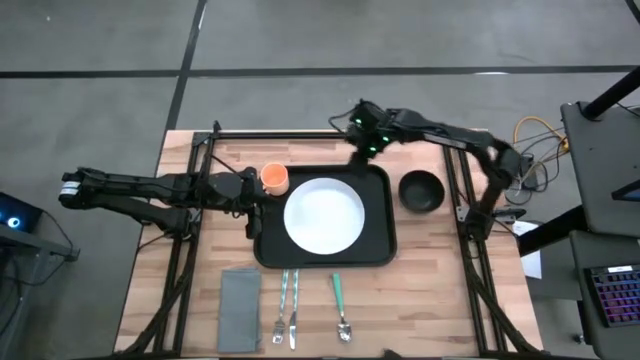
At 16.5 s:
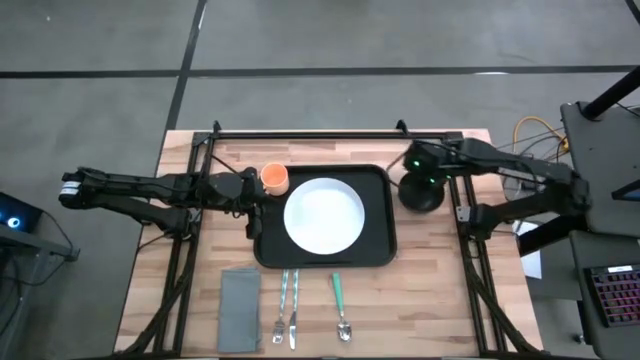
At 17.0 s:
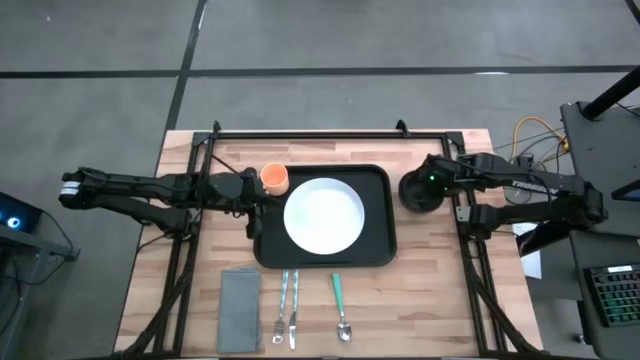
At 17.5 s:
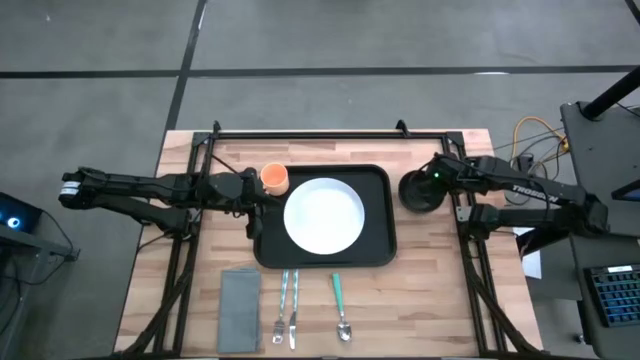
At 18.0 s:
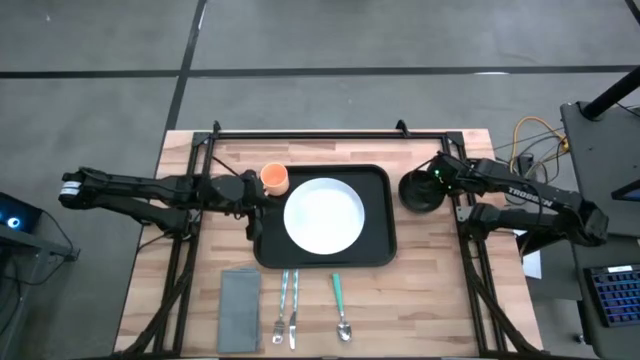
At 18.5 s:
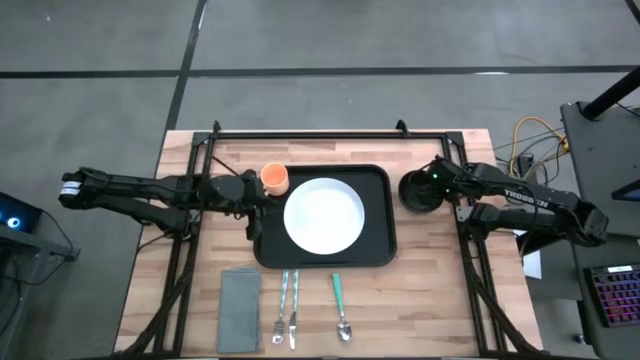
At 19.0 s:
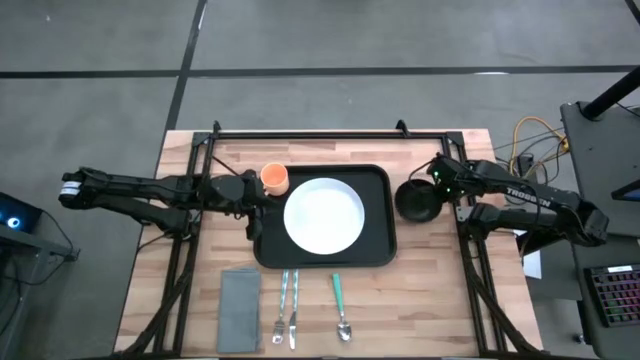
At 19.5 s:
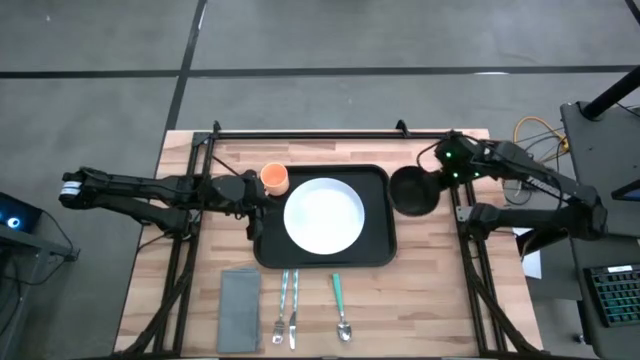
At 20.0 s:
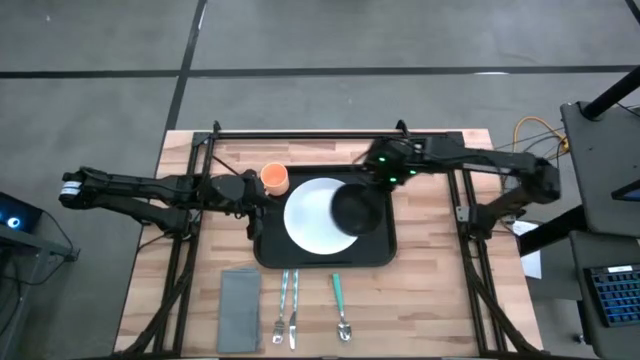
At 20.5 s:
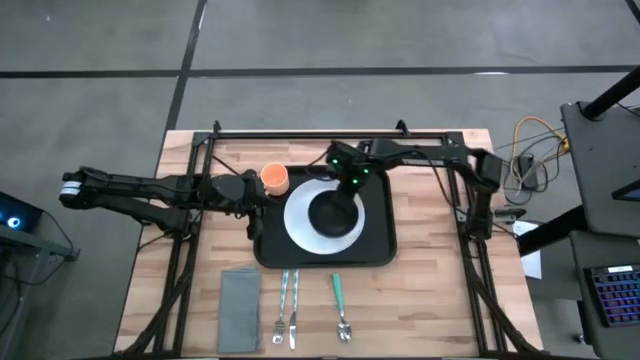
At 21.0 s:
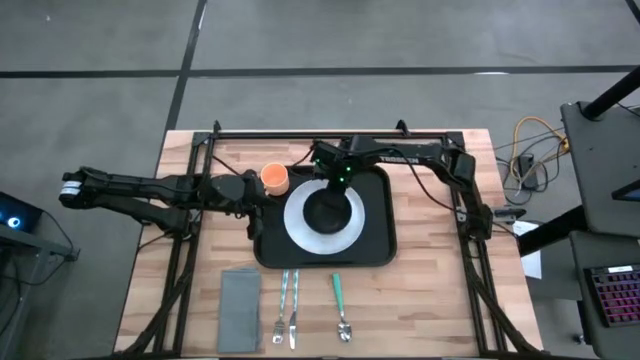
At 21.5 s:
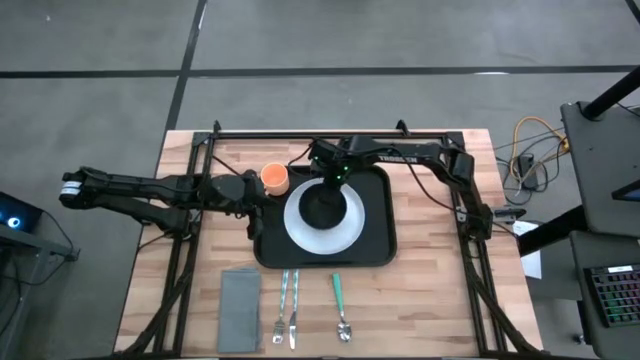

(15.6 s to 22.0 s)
Task: Set up tray
Put the black bowl on the white plate to the bottom right of the orange mug

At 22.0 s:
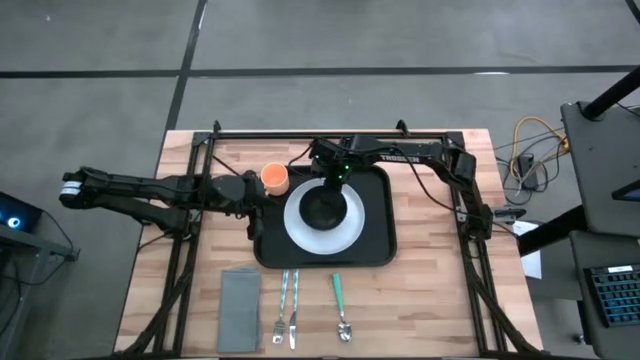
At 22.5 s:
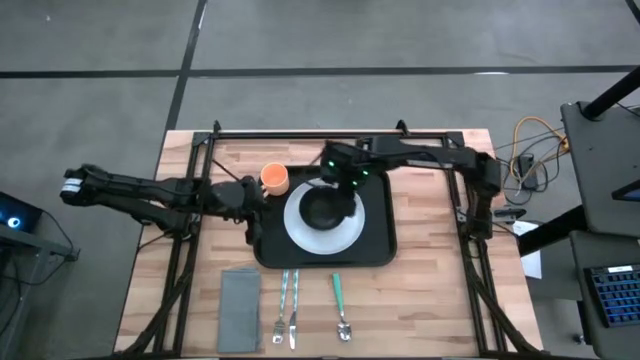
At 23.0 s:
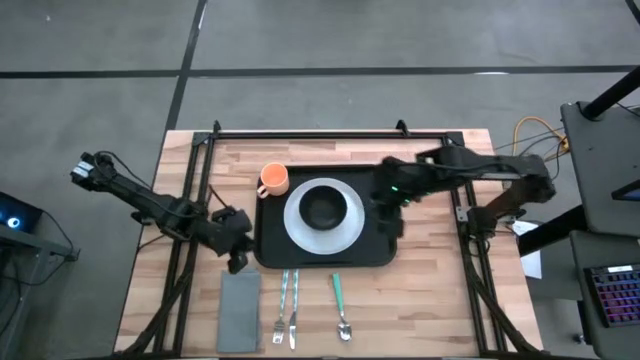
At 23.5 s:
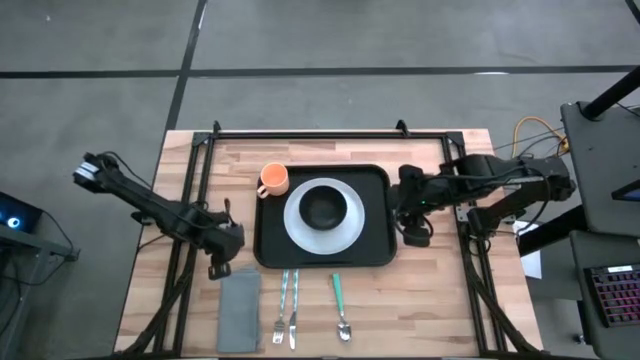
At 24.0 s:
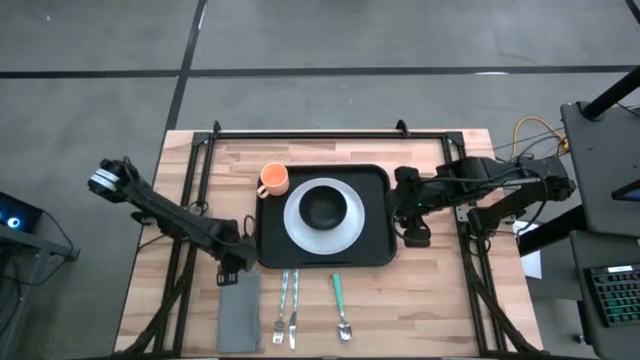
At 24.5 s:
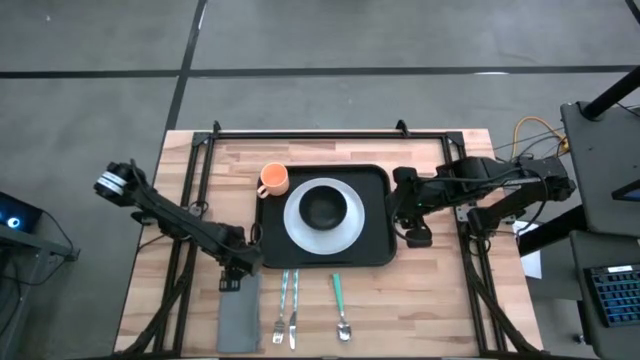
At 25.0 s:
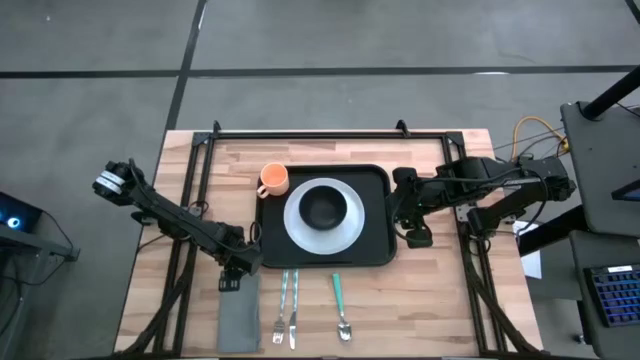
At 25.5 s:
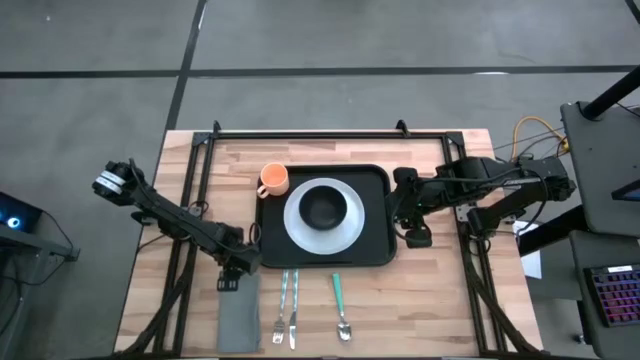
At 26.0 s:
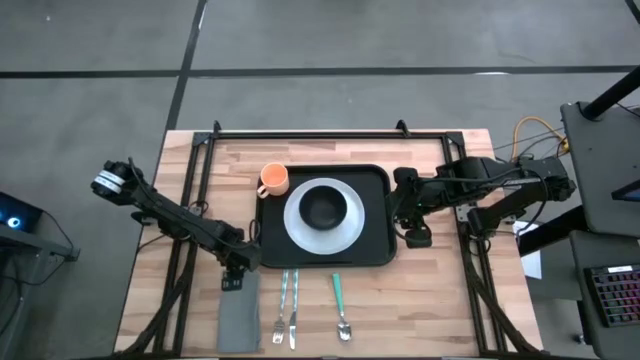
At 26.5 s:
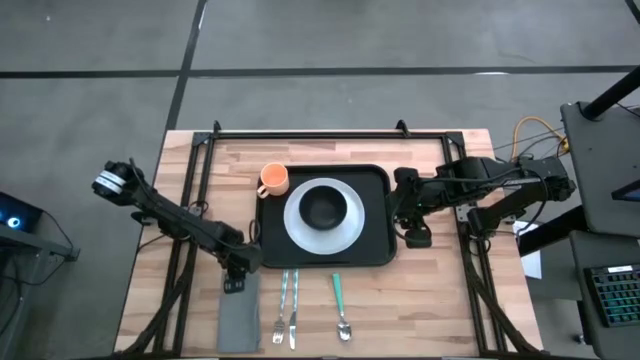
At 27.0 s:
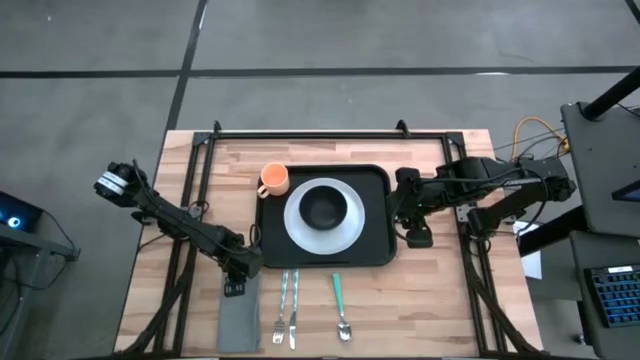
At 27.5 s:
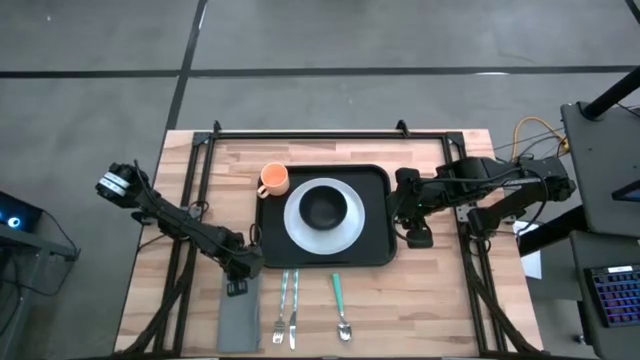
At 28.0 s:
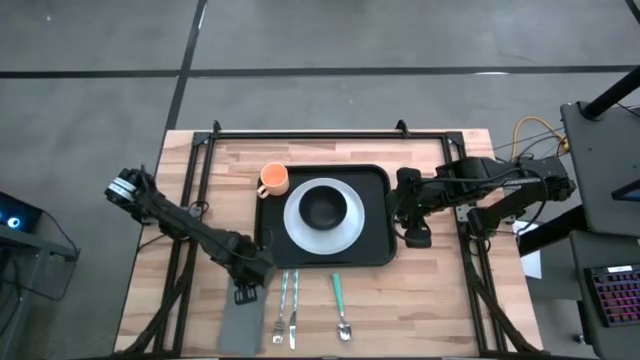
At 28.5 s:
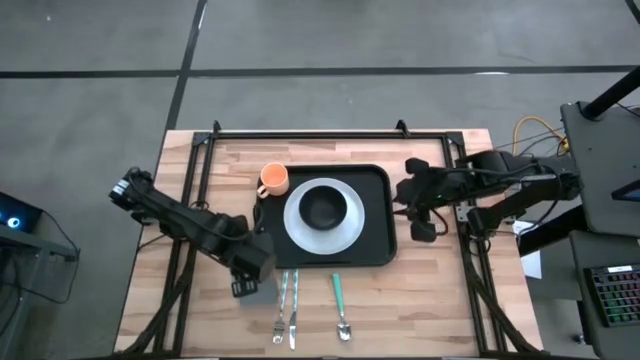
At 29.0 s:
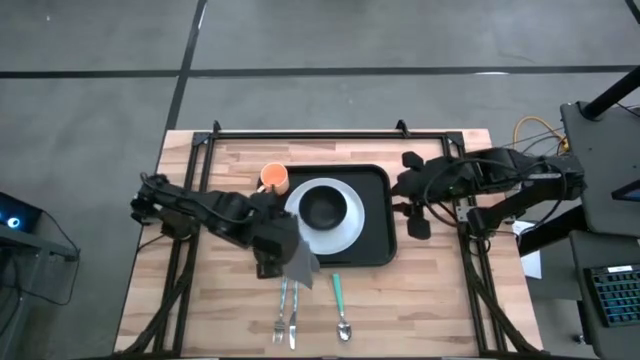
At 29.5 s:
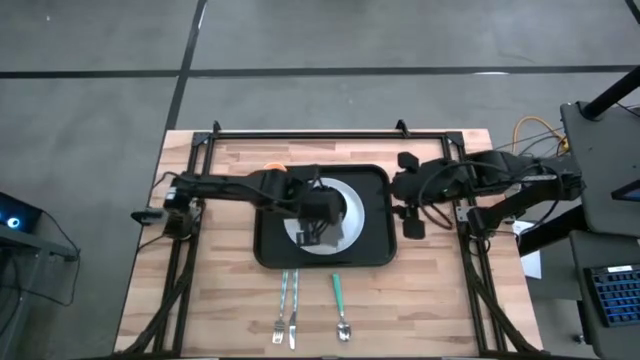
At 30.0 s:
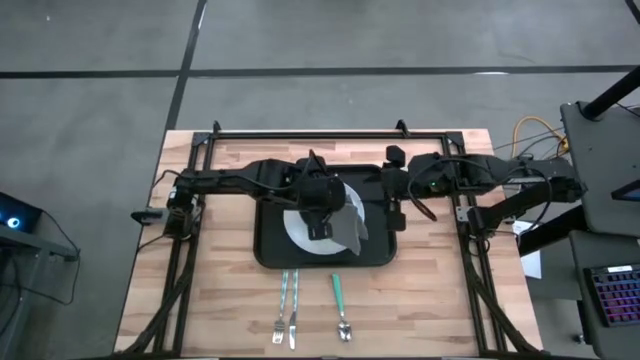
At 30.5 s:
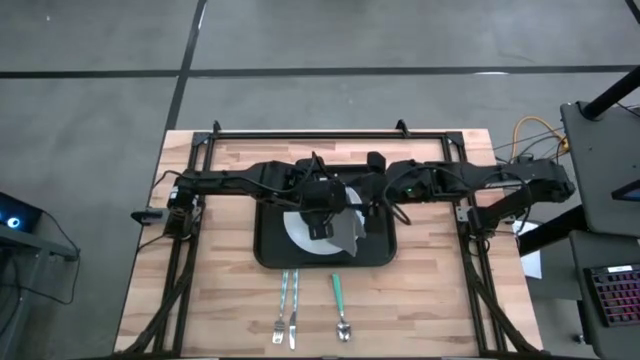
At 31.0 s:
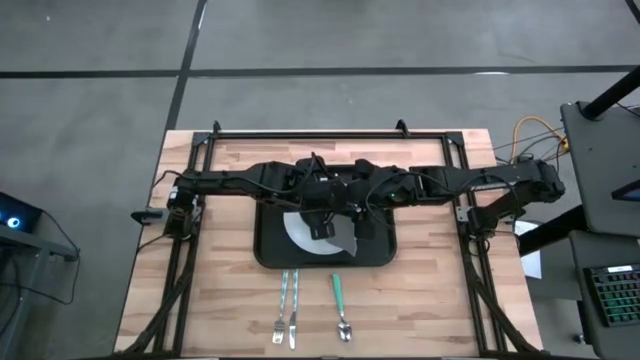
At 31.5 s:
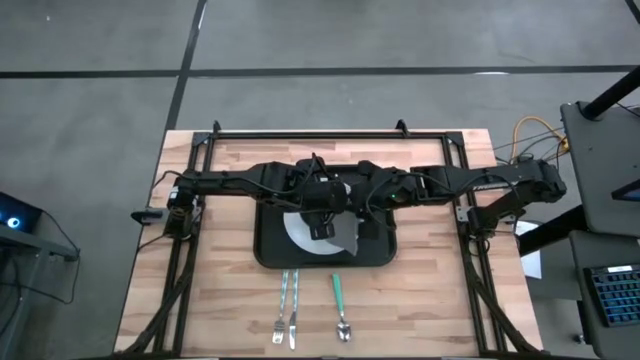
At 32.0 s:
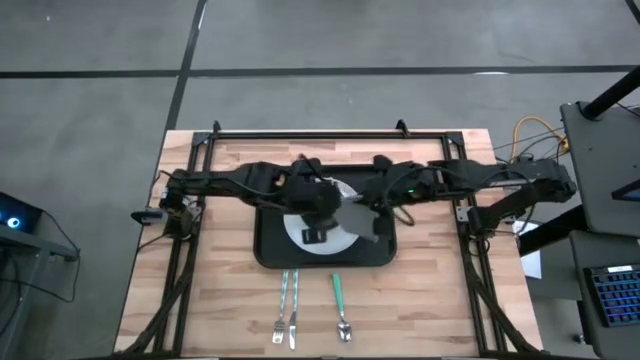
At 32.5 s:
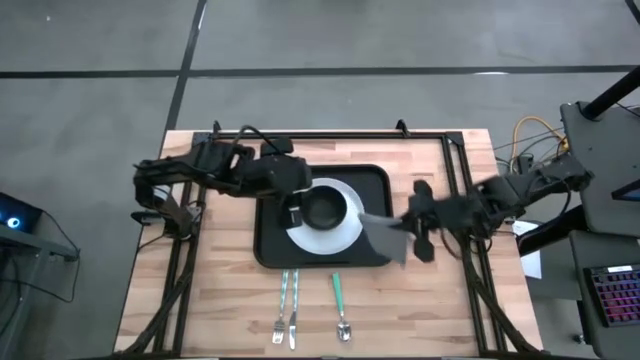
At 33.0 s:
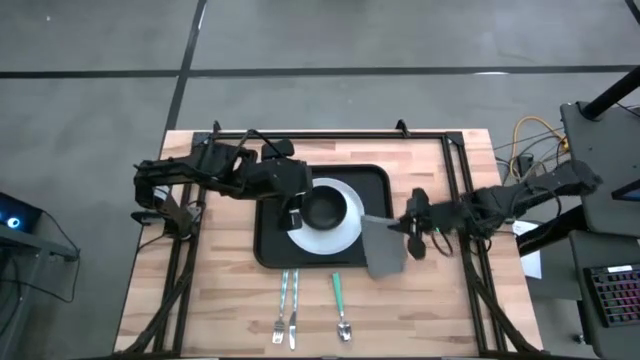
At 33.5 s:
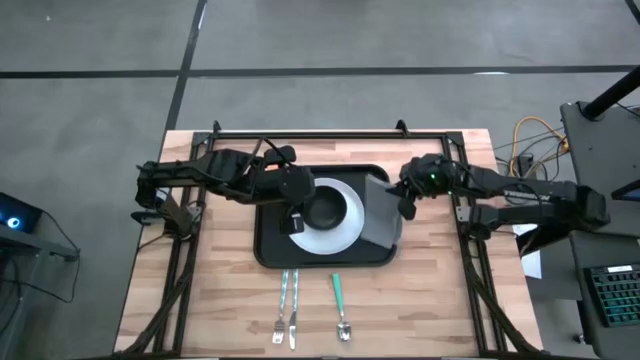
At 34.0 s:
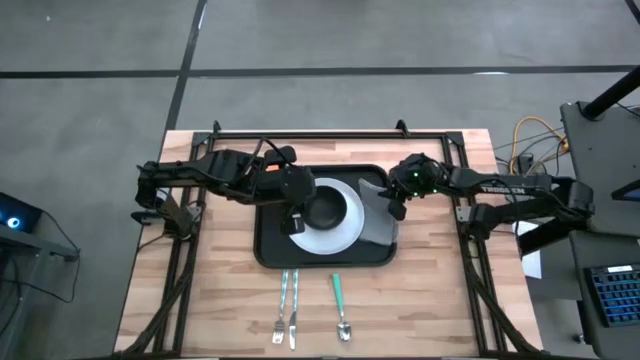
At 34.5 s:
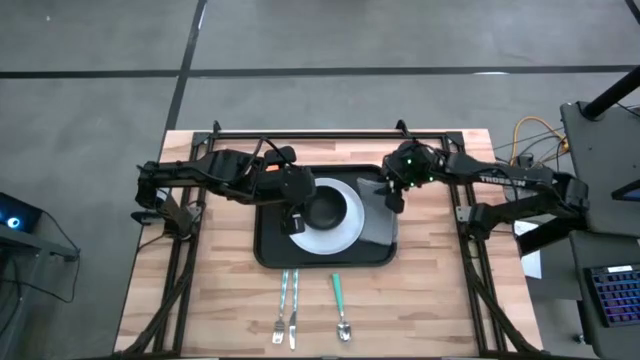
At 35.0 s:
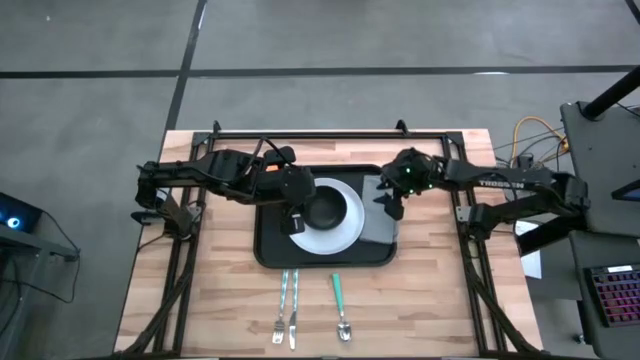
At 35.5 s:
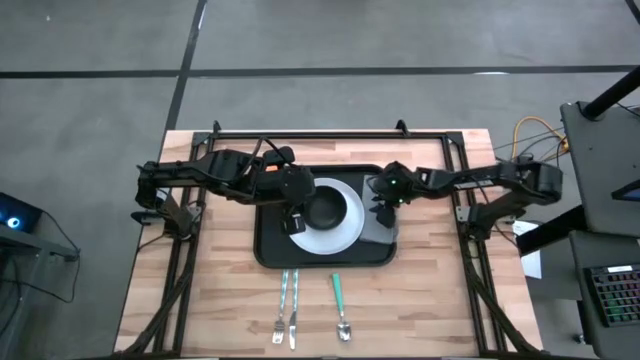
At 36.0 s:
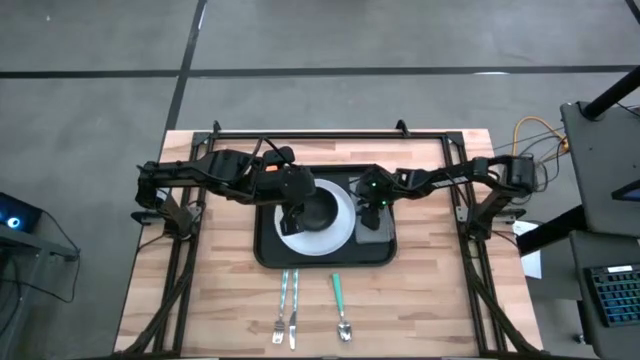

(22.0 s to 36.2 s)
Put the gray napkin on the black serving tray to the right of the white plate
